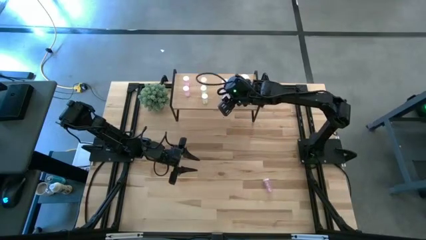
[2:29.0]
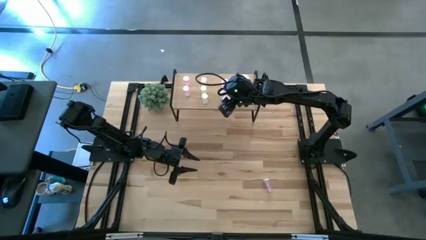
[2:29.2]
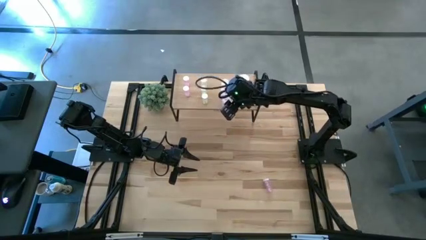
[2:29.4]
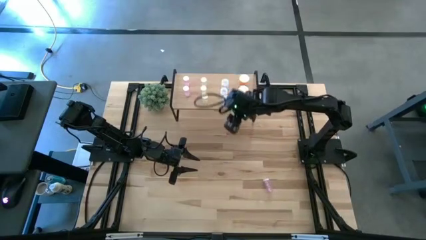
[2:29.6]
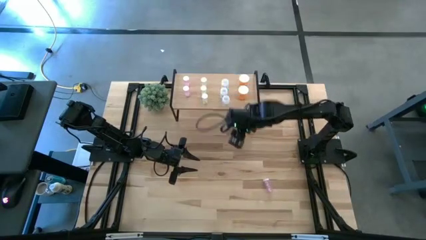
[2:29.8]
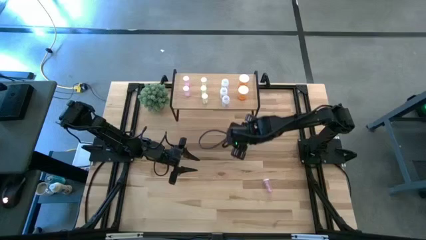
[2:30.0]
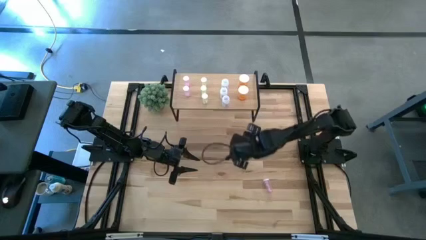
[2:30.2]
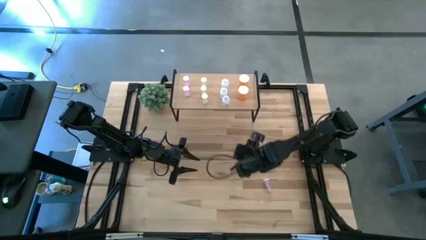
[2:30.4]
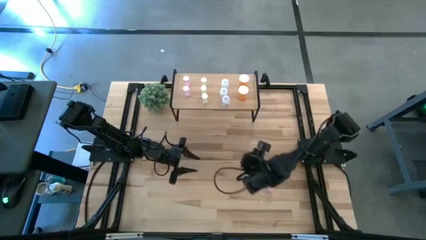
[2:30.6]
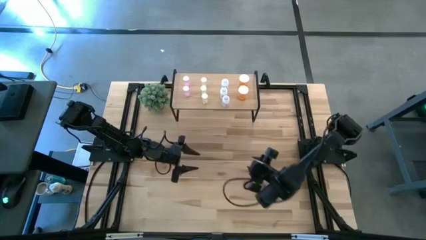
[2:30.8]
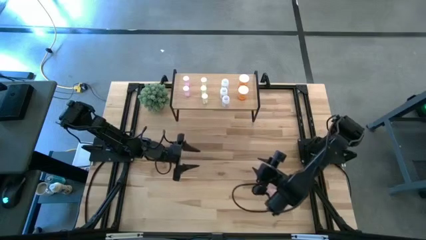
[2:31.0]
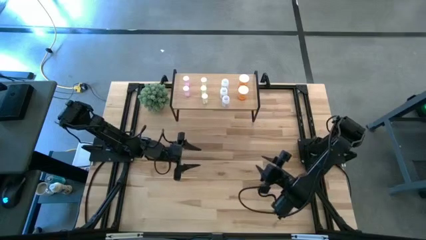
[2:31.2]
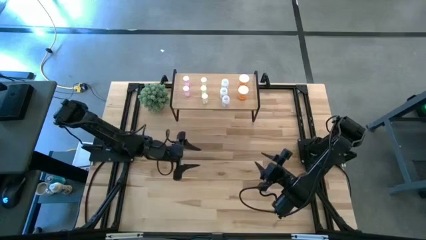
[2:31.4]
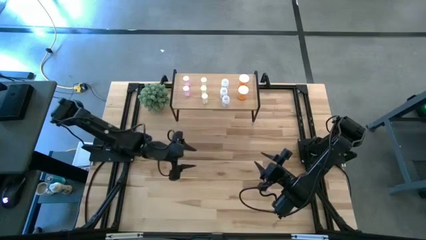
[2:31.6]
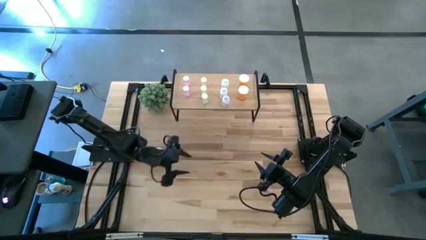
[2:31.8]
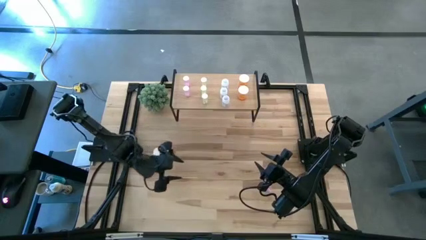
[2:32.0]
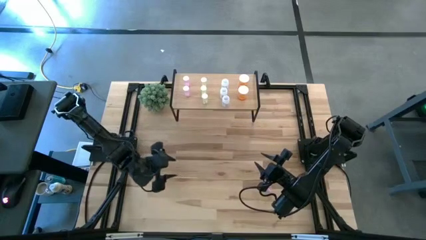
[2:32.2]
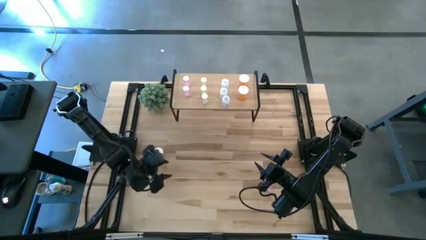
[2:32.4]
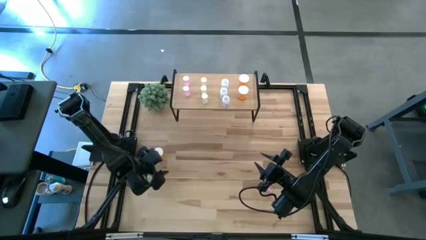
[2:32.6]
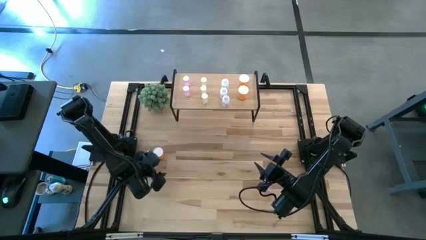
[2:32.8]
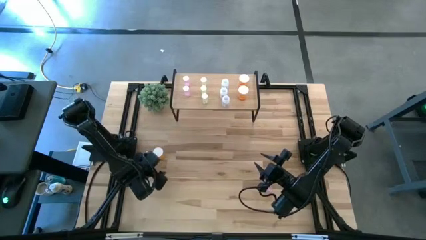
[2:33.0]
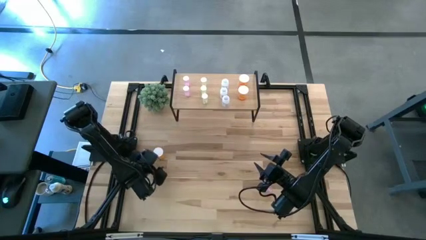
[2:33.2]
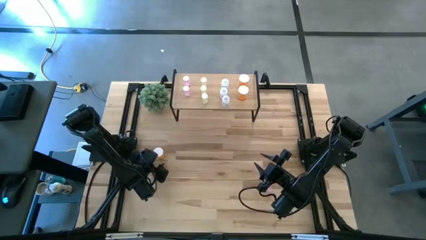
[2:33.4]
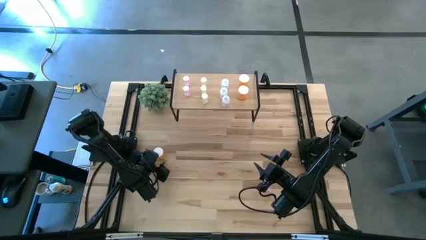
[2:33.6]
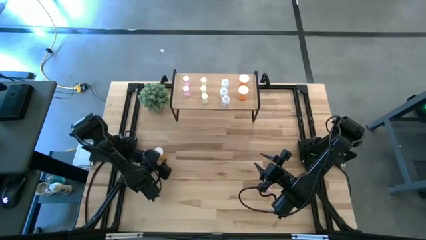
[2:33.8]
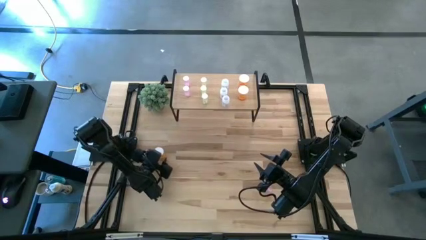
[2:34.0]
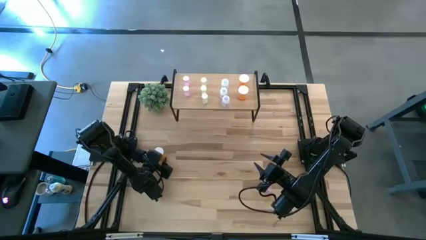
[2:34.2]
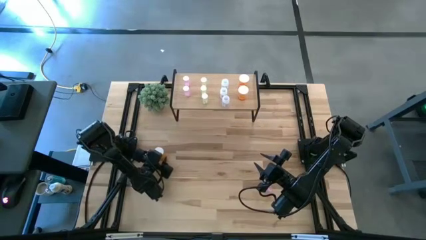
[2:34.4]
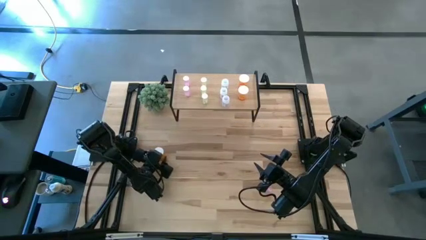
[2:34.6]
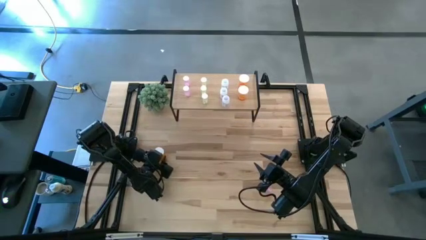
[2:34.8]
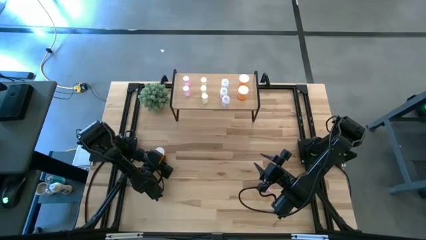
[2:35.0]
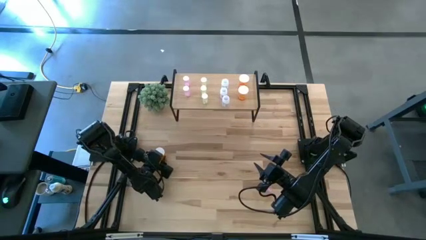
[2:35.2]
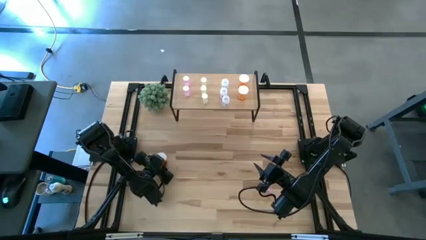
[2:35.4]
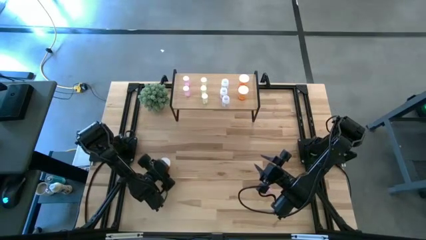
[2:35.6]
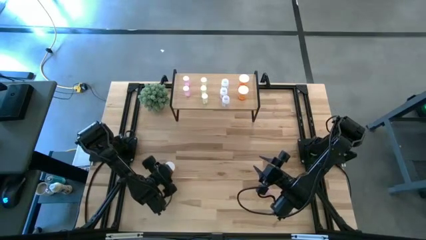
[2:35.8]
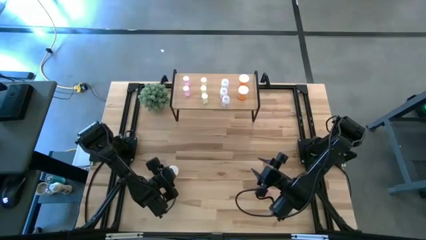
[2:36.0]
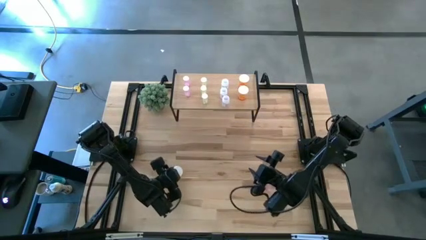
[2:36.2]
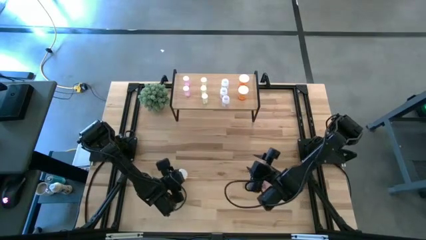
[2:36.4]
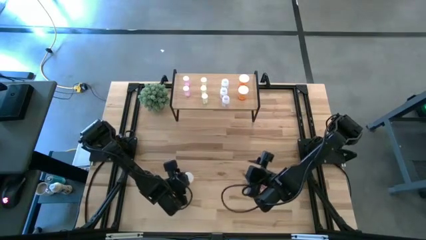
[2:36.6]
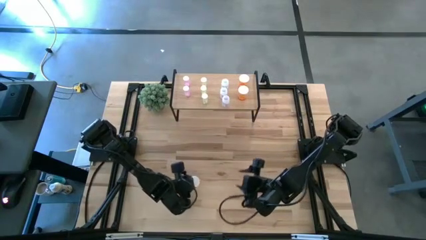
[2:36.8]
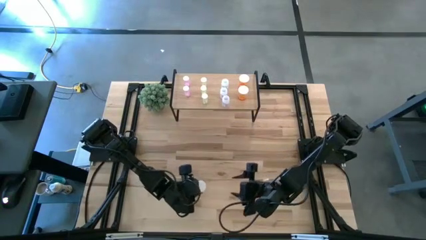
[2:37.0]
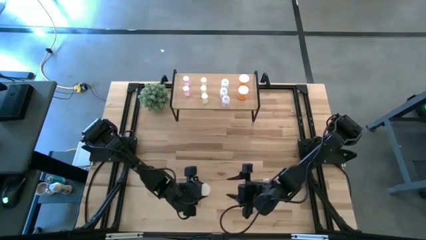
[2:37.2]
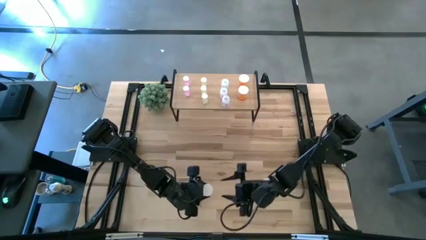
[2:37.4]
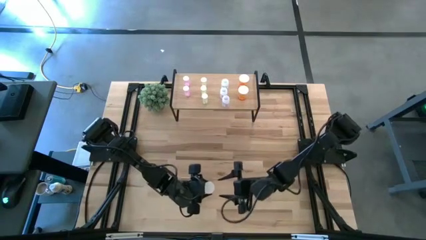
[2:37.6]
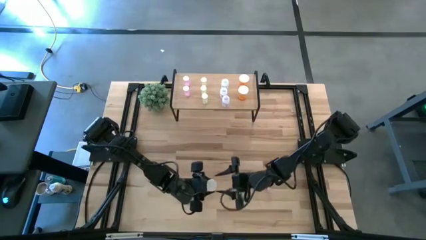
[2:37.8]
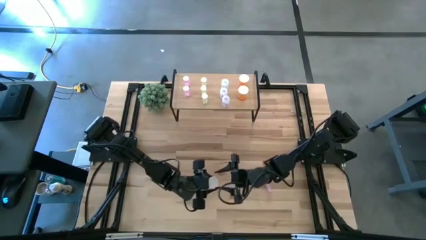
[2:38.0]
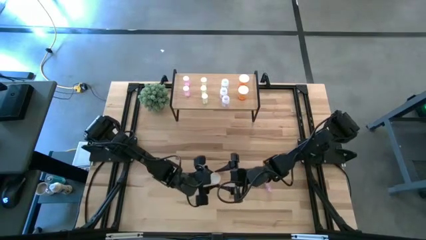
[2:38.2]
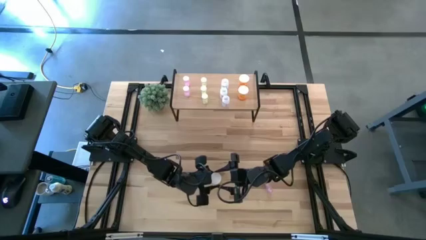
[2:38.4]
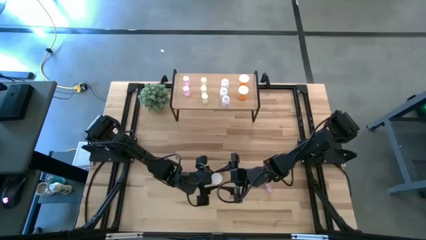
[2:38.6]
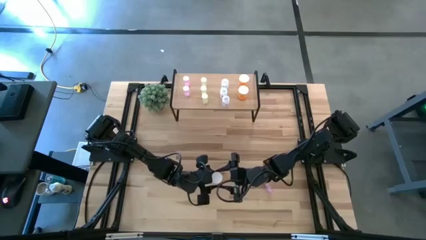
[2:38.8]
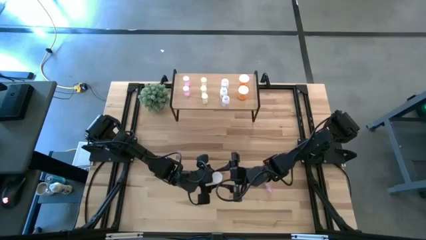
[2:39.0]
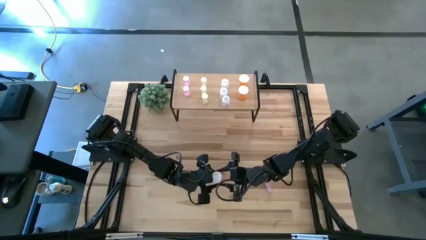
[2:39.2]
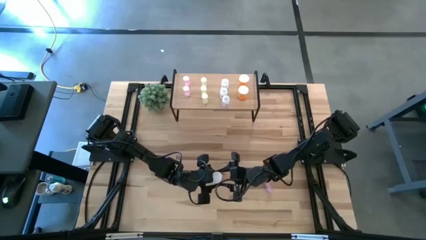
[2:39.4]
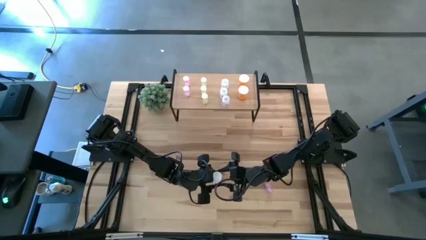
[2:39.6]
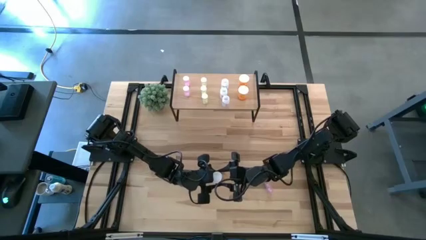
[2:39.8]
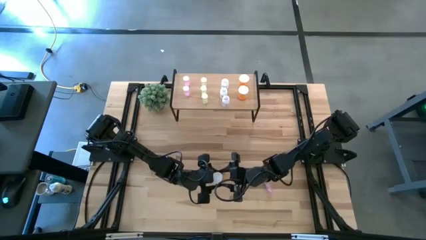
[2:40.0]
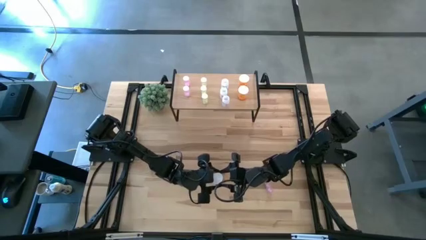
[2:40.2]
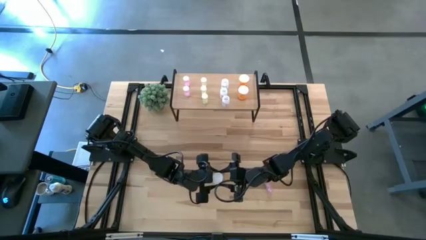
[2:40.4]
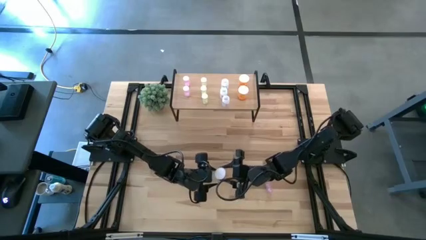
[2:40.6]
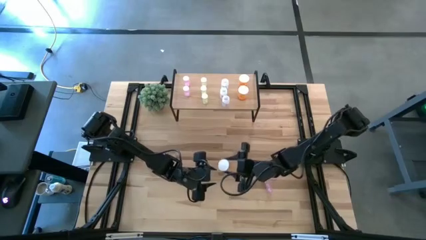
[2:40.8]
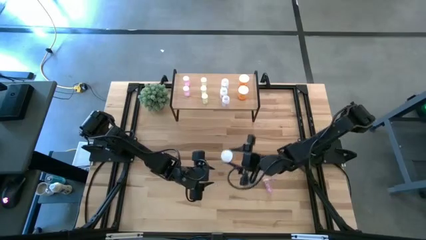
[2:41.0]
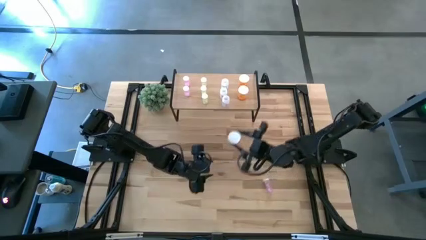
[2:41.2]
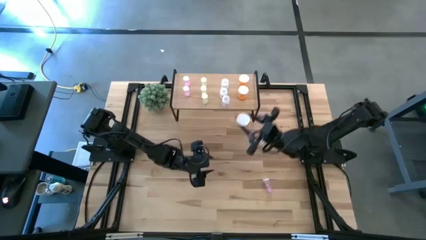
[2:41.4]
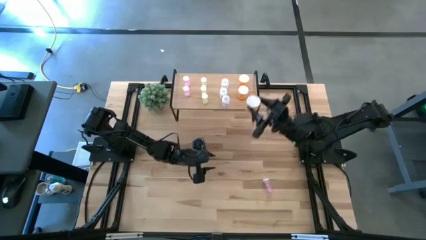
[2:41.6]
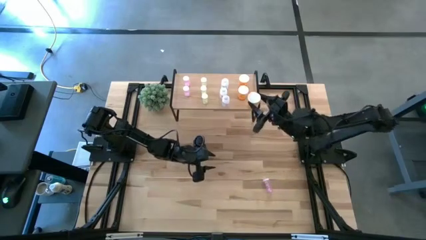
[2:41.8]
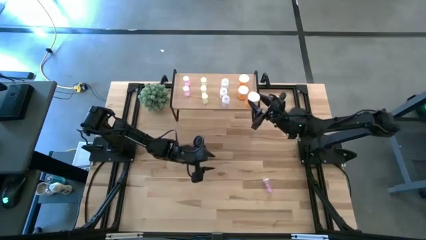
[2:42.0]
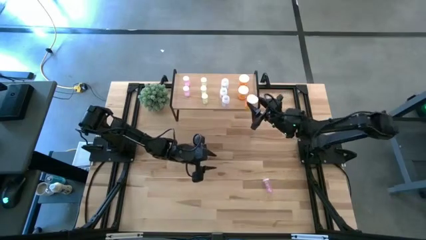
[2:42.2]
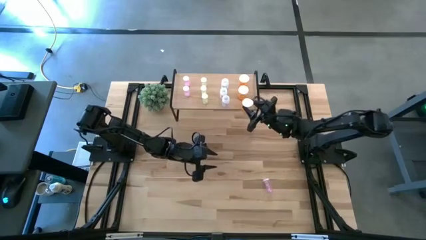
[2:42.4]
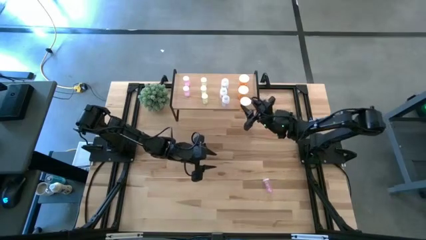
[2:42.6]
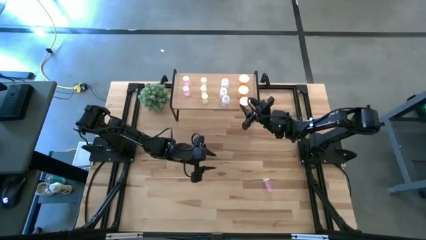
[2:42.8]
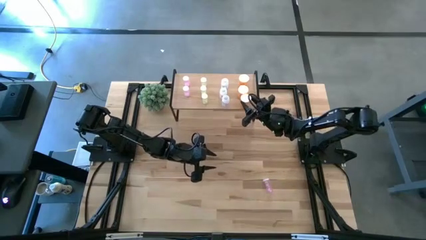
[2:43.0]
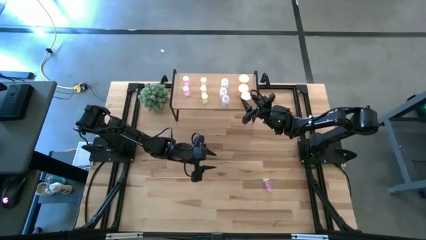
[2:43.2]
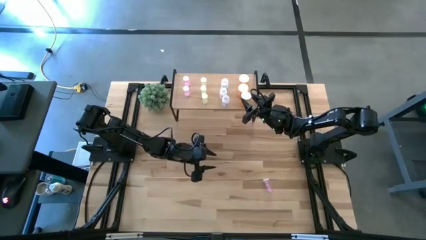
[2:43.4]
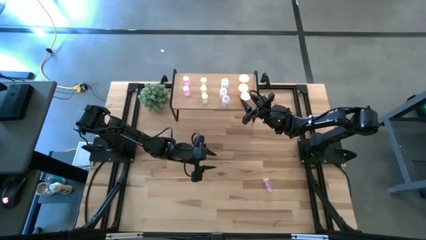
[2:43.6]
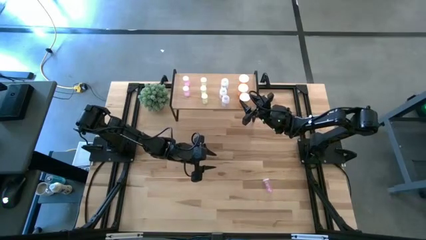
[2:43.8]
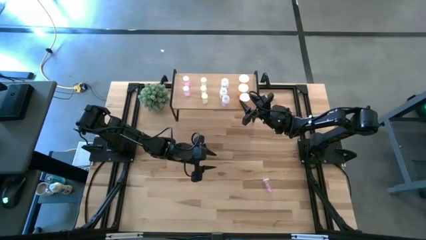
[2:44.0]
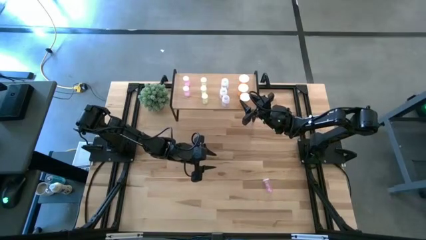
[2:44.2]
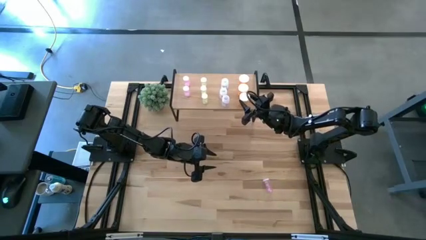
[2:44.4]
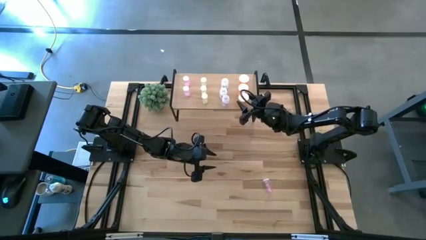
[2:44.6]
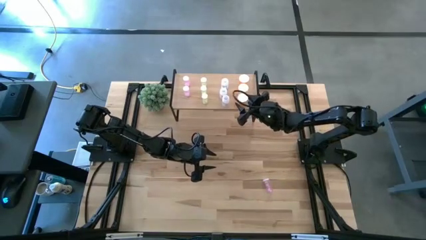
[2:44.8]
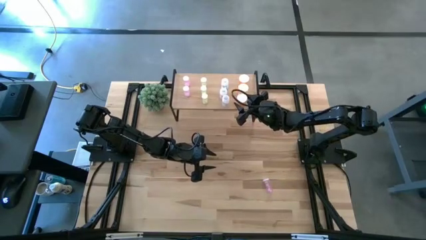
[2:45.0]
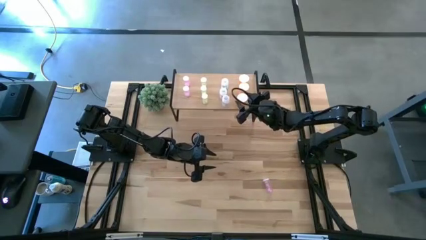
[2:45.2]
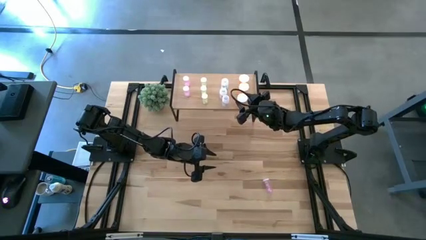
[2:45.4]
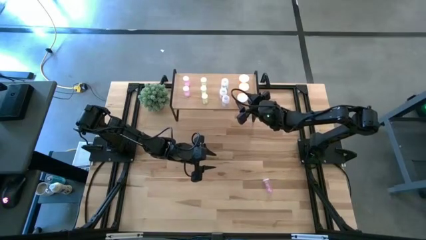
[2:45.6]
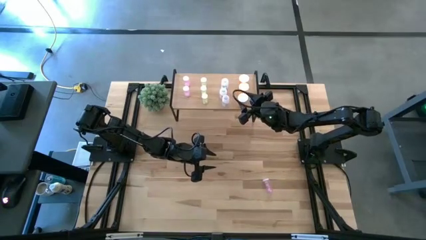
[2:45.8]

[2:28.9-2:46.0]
Task: Pick and place medicine bottles onto shelf by color
Put the orange pill bottle aligned with the other orange pill bottles on the shelf

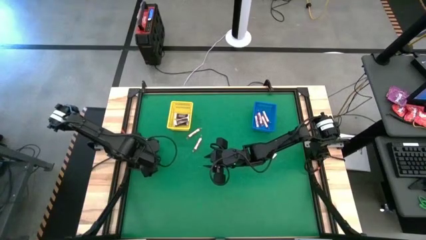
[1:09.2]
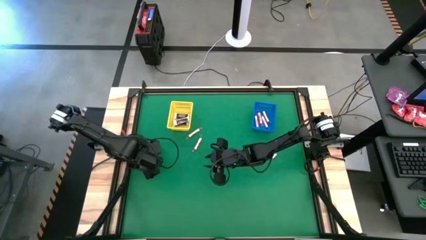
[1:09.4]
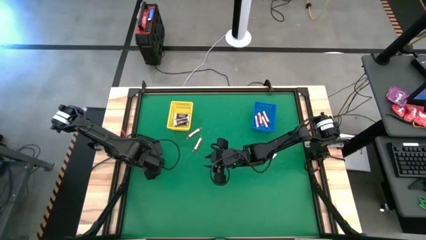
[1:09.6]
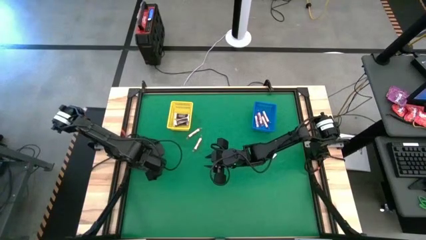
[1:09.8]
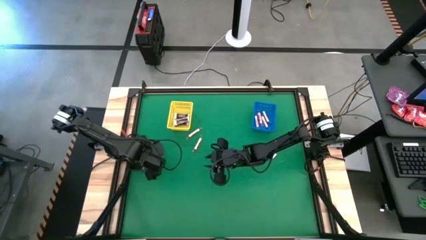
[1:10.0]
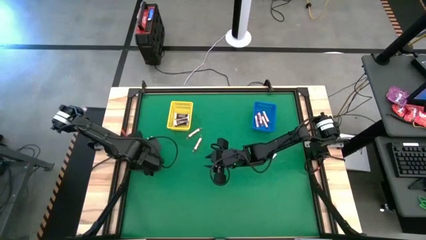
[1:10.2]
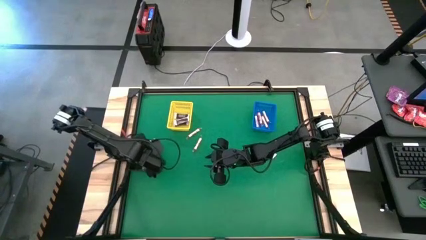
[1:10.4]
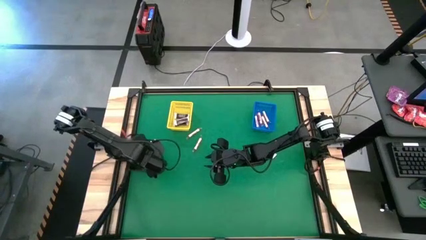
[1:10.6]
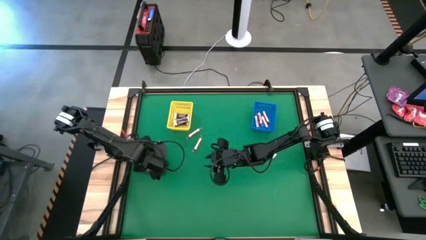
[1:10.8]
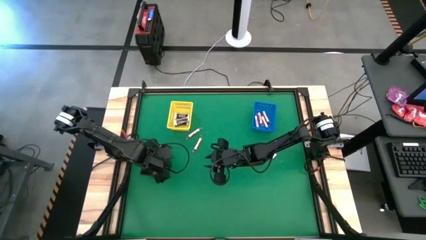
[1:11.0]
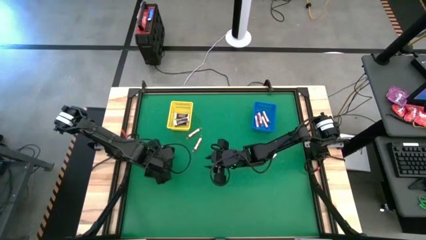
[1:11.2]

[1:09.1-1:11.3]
Task: Sort candy by brand, put in halloween buckets
Adjust the black bin
